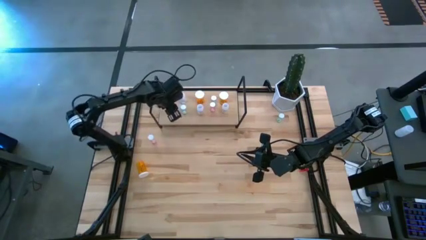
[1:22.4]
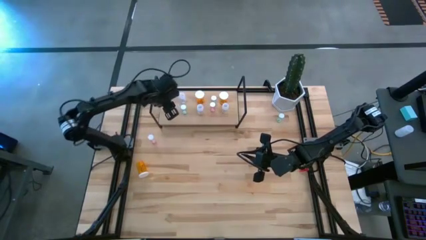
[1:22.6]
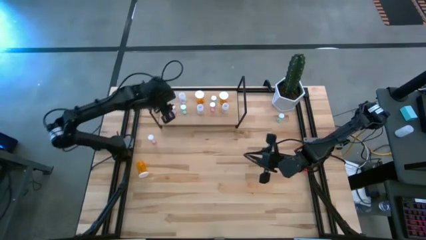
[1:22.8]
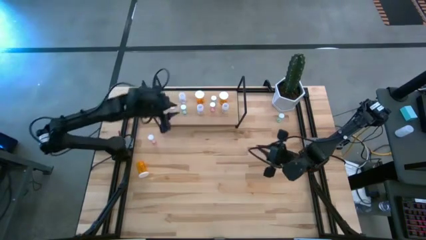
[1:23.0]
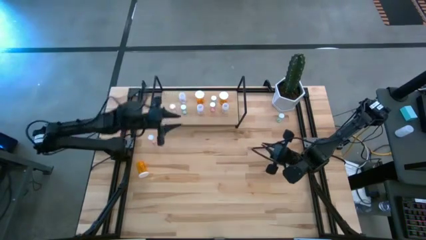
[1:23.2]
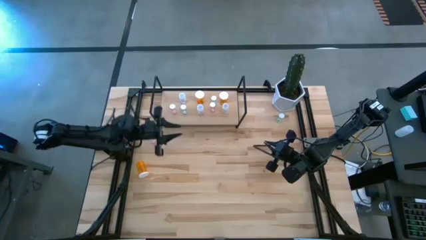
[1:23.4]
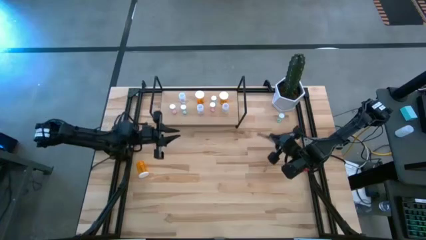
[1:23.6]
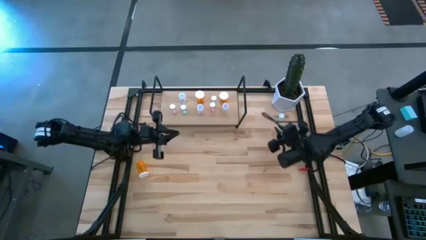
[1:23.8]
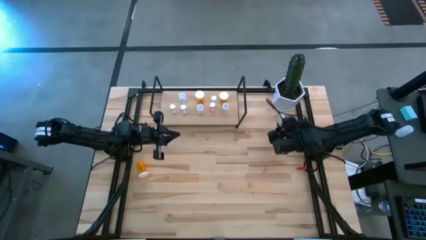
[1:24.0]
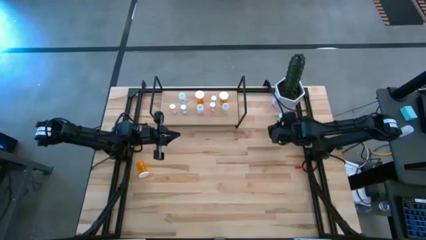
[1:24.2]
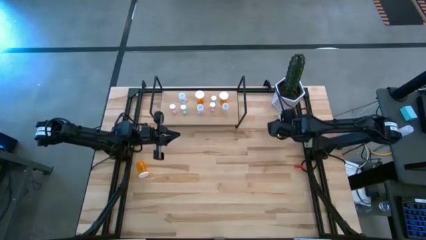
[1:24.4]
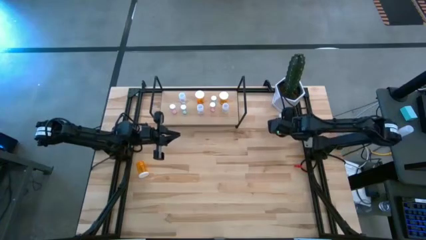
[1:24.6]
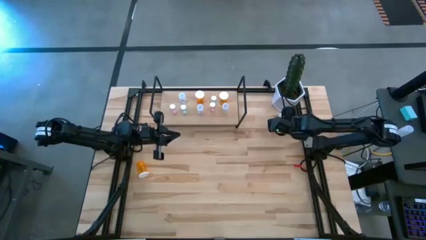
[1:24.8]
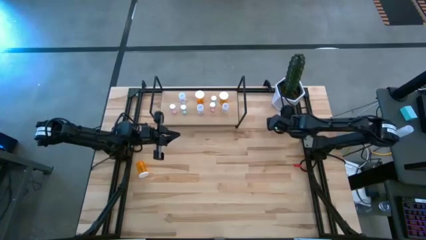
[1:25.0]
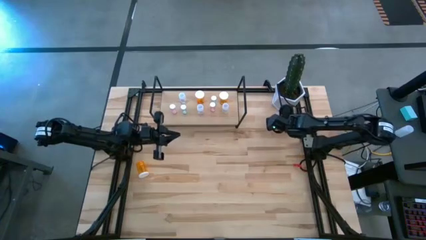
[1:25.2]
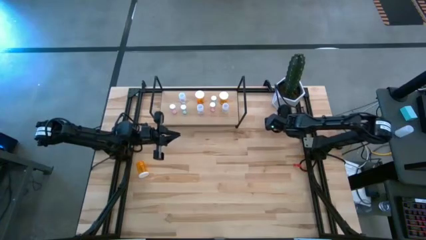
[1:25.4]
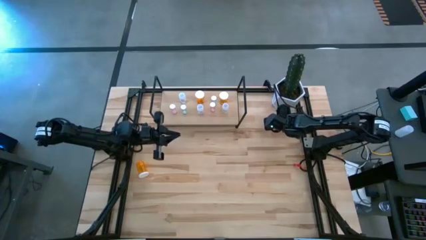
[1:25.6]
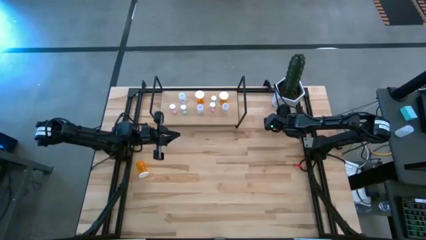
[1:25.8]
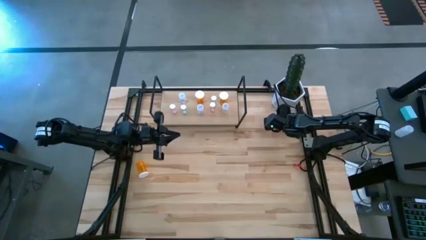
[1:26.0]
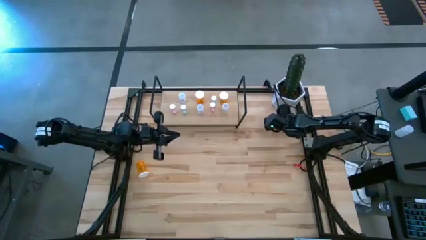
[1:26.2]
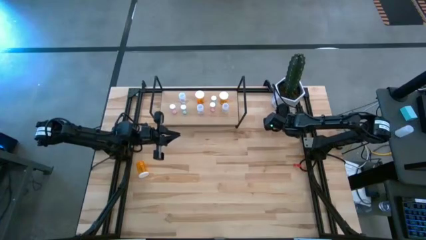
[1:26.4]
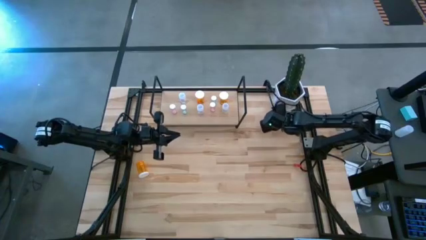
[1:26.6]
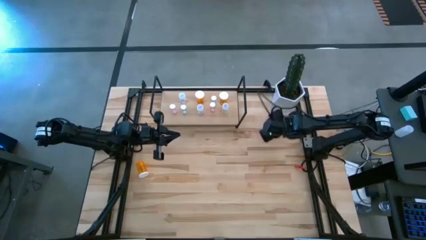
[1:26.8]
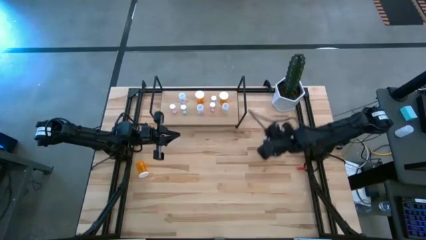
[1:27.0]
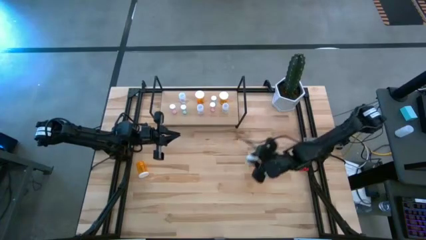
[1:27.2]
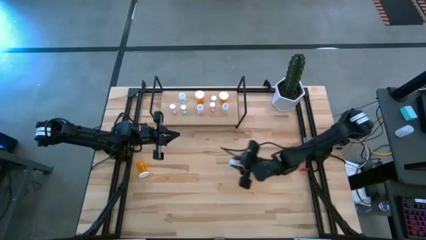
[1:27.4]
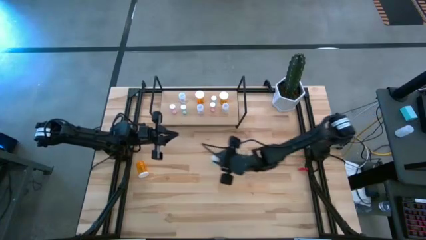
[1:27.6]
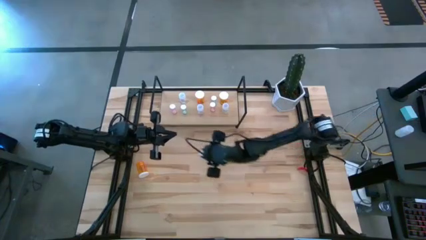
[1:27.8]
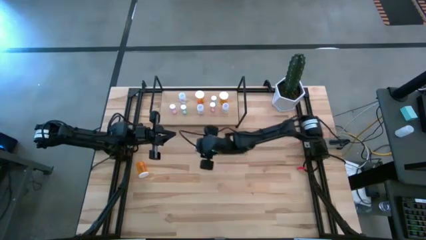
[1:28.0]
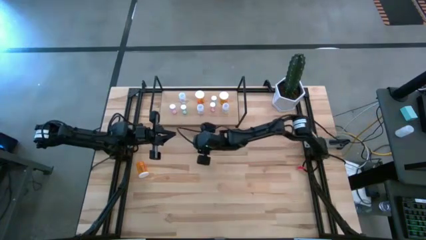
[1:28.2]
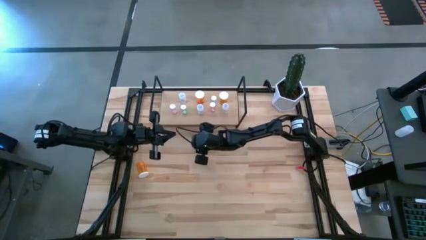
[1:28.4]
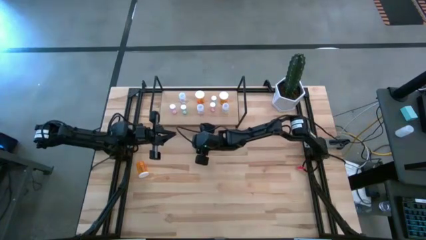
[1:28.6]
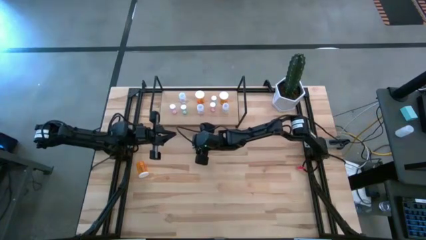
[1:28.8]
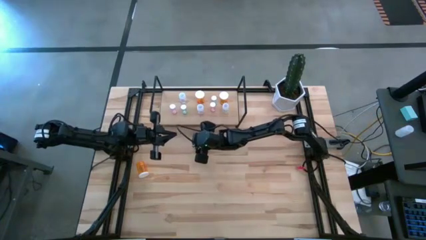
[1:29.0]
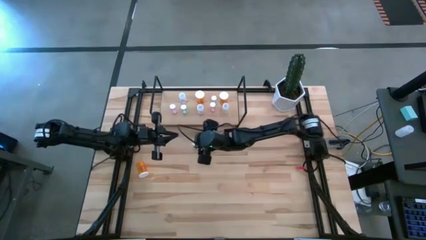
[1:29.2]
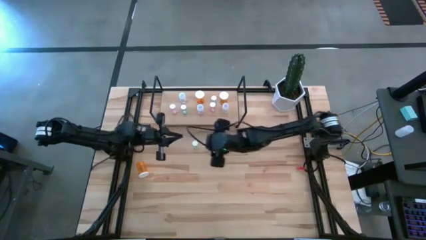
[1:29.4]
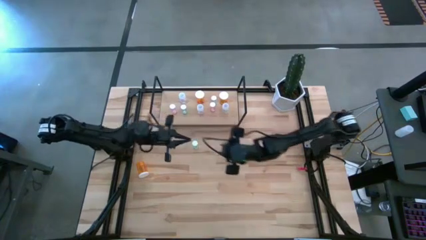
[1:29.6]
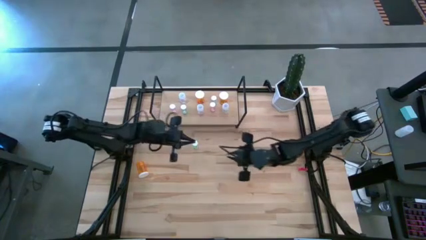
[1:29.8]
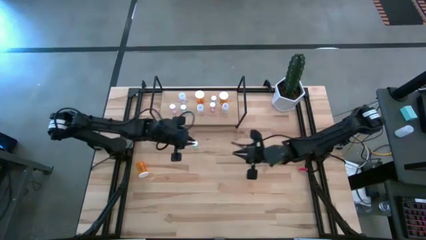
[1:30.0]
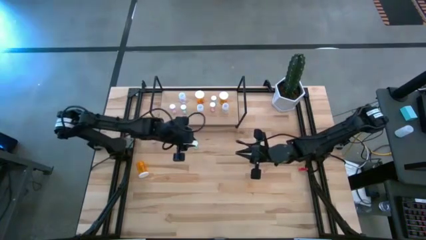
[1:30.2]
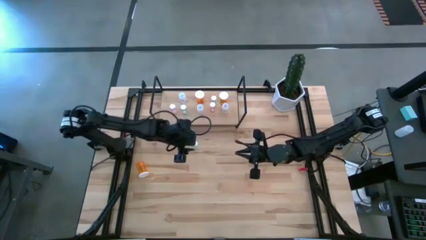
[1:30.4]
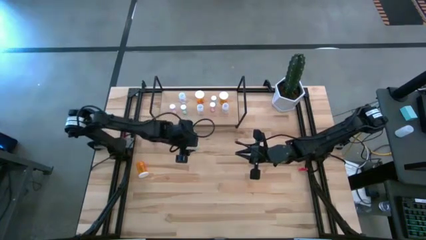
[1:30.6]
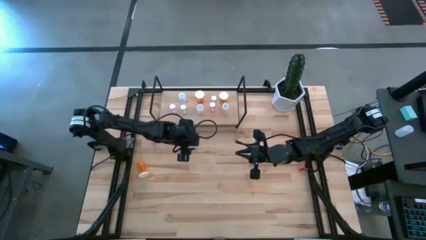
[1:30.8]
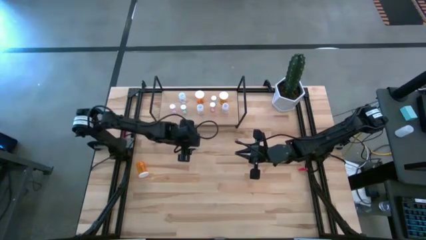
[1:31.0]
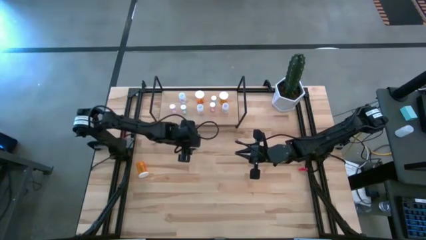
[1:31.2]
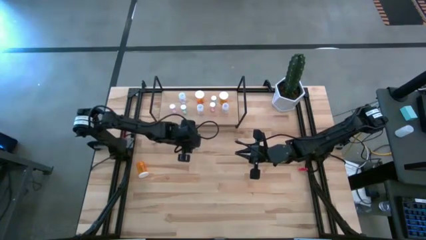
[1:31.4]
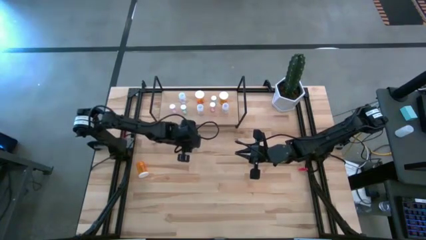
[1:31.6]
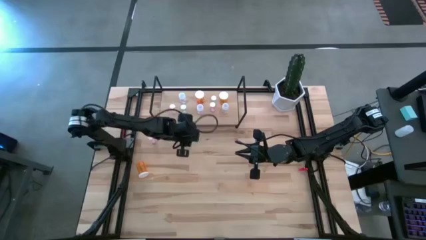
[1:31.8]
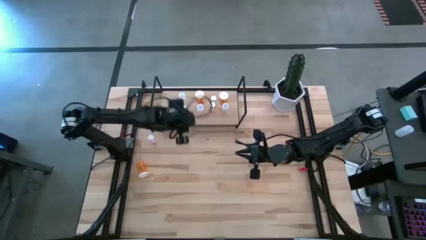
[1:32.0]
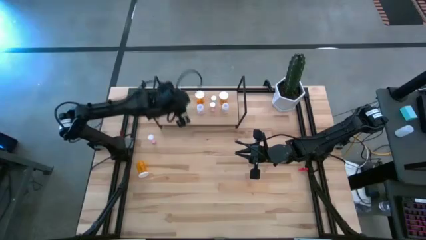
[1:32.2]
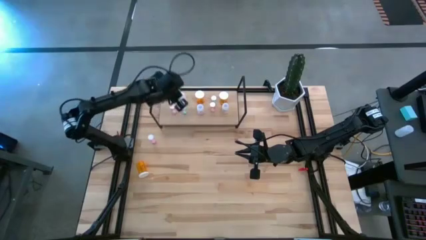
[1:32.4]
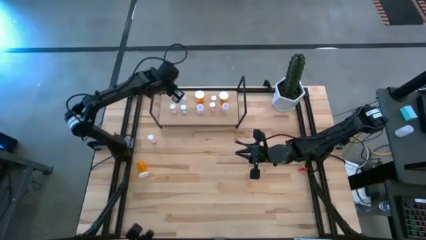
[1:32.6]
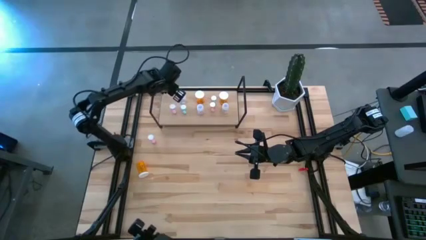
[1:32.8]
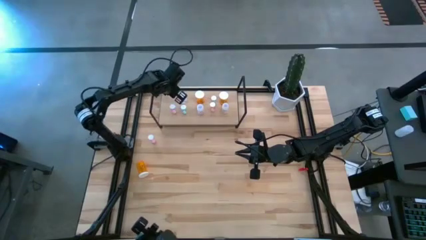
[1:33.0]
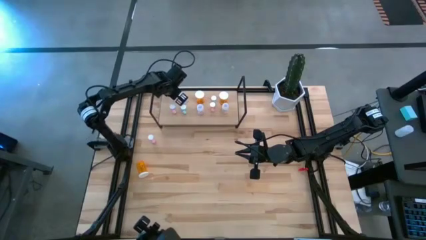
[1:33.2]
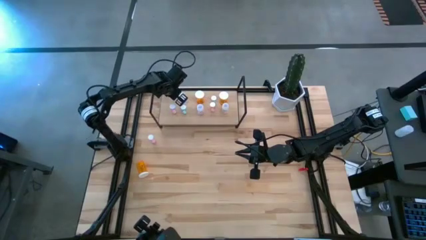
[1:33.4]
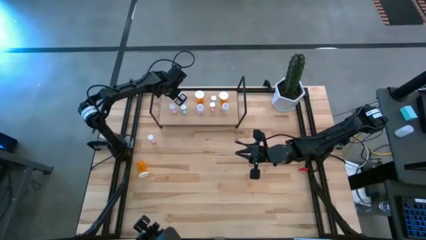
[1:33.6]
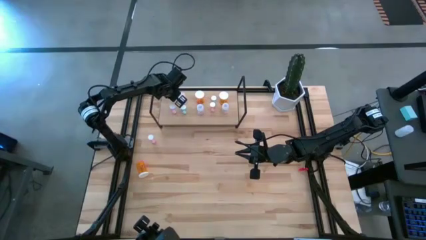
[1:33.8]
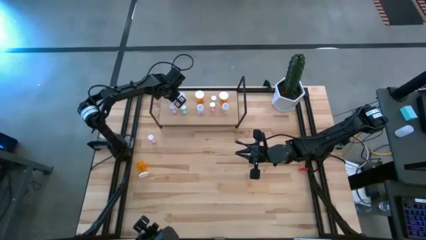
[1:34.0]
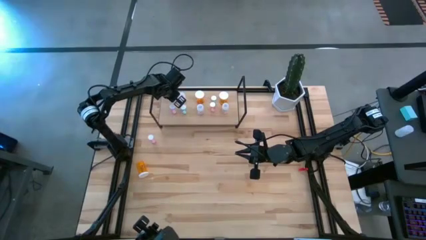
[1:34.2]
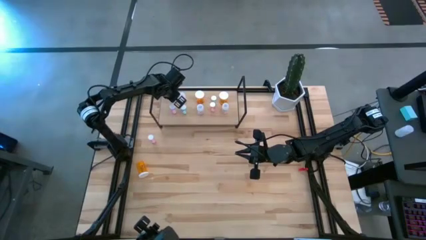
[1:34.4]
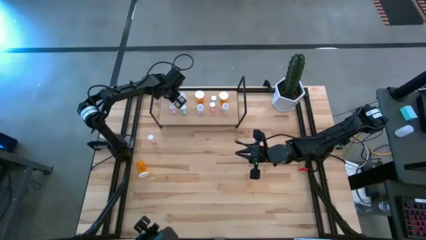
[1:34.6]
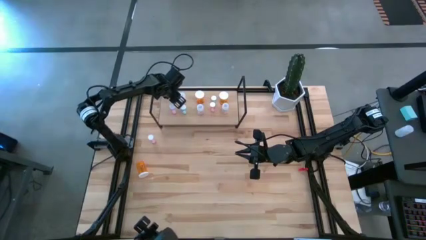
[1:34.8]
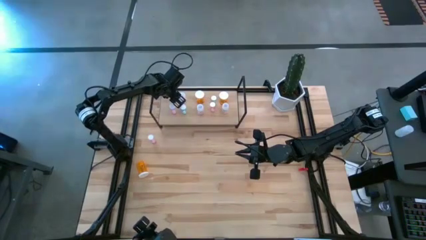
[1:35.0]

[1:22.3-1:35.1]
Task: Pick and place medicine bottles onto shelf by color
Put the green pill bottle on the shelf

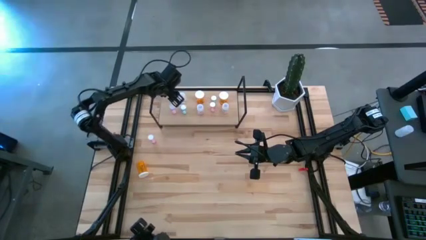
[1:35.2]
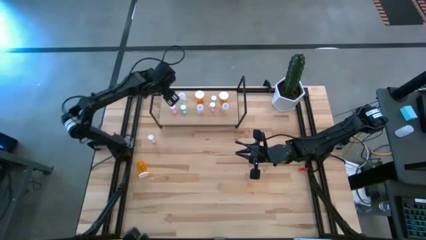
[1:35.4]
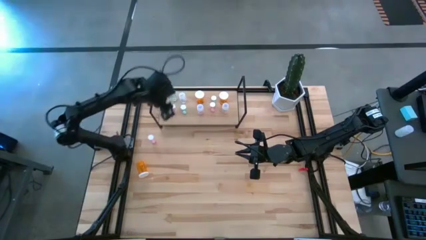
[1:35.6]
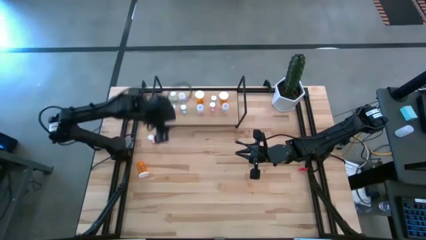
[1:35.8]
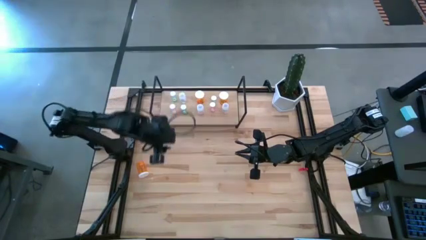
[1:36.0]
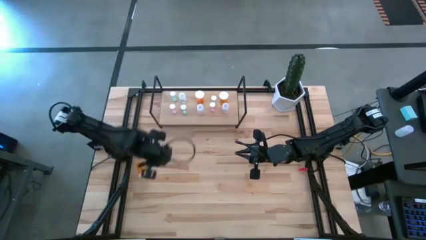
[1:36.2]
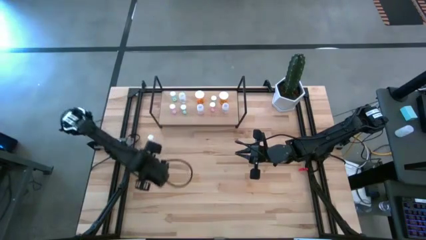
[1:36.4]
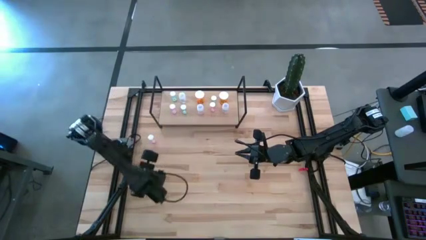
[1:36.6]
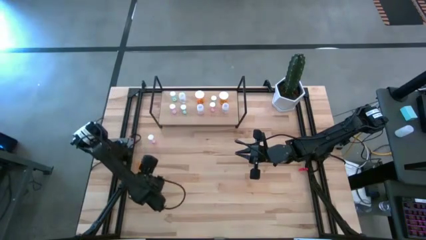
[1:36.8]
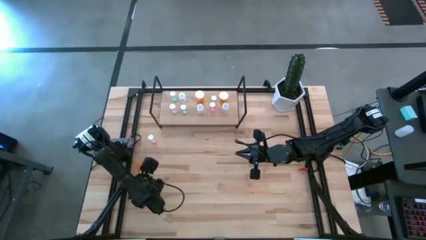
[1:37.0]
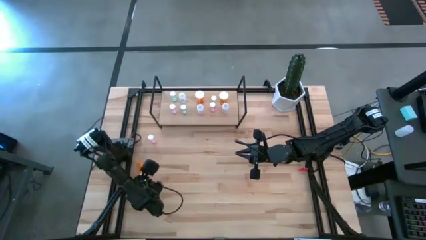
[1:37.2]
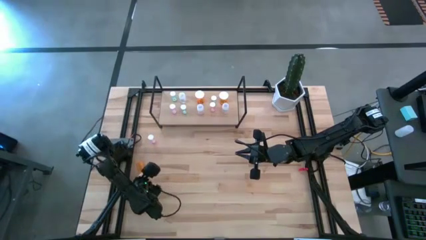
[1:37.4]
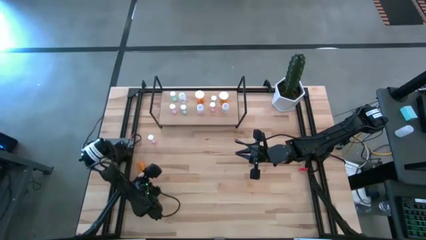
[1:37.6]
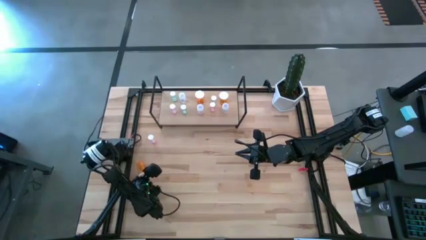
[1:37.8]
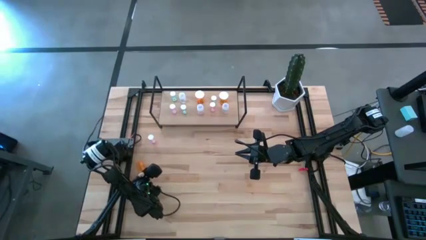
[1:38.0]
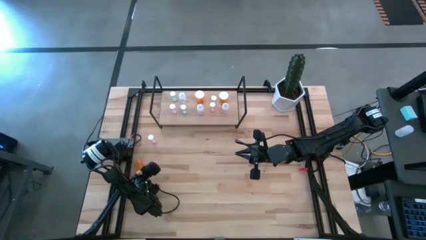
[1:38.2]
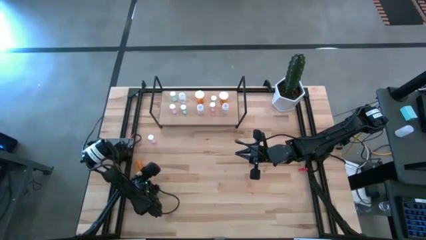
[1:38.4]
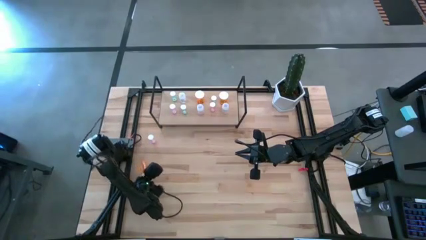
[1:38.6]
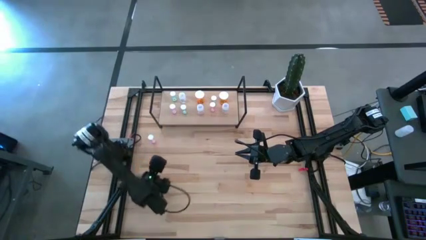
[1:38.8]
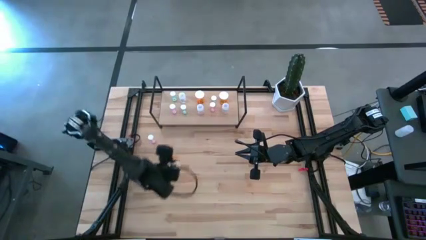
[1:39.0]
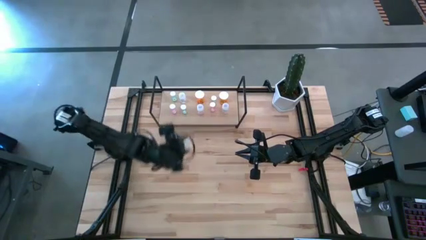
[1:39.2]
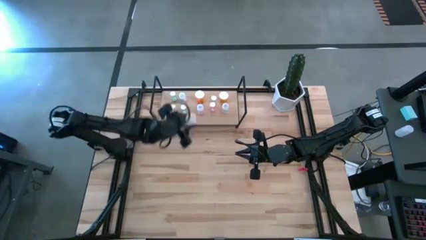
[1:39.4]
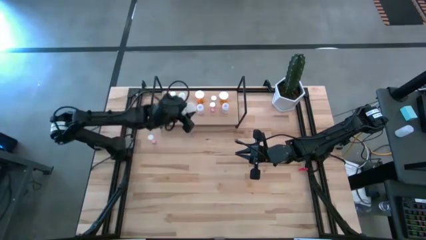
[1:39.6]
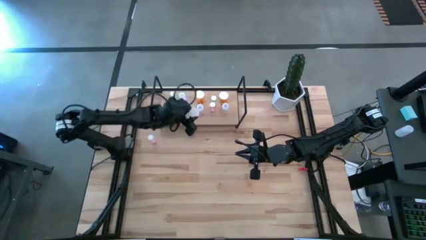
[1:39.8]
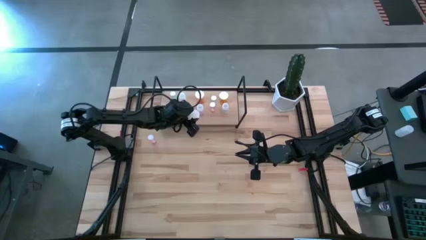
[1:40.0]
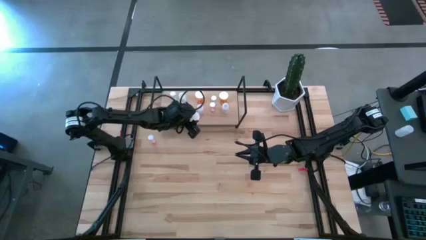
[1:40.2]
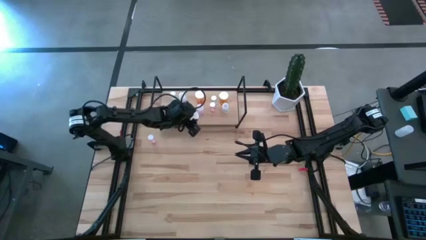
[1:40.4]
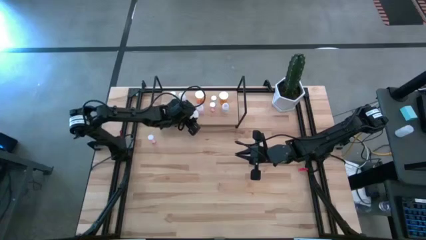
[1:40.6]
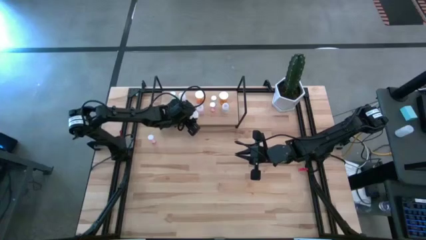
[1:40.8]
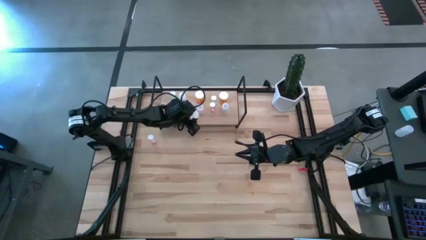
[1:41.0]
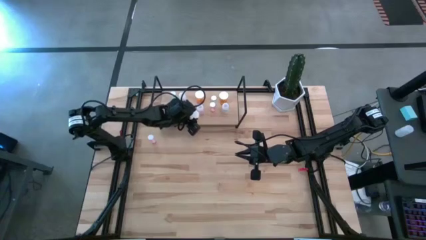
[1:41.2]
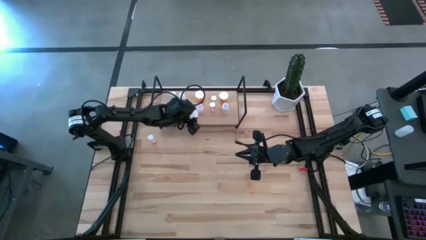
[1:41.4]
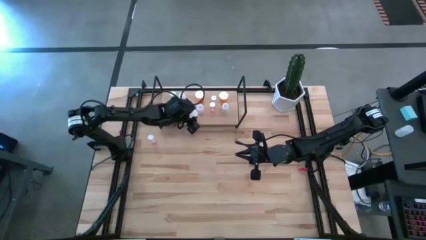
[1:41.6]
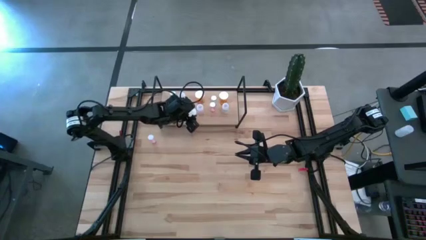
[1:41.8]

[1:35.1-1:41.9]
Put the orange pill bottle on the shelf
